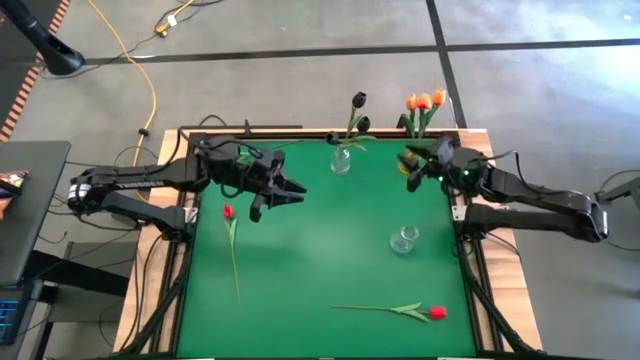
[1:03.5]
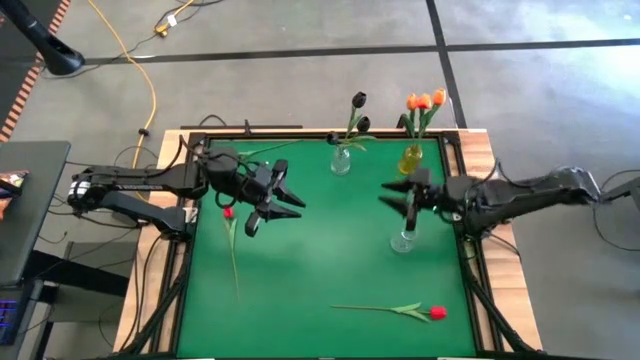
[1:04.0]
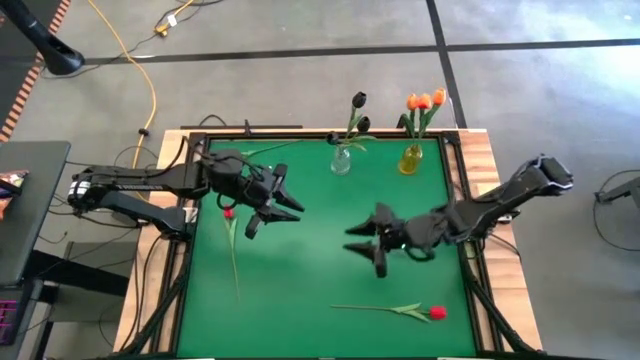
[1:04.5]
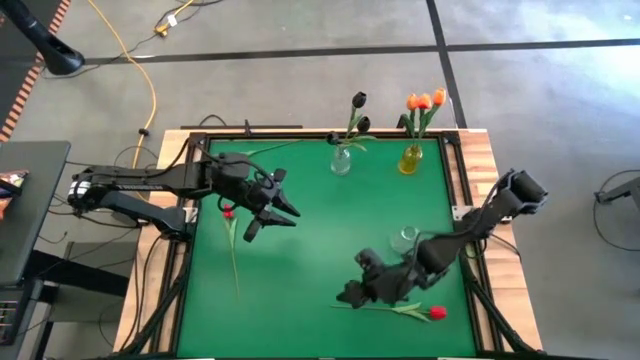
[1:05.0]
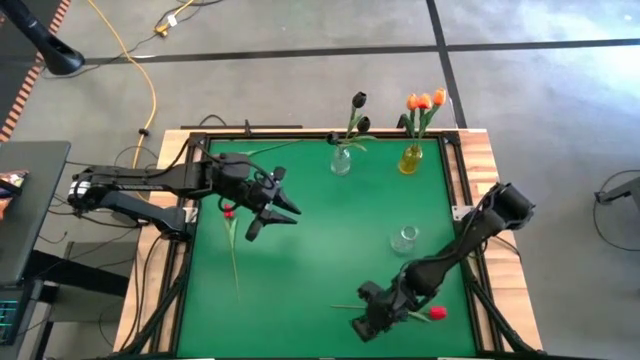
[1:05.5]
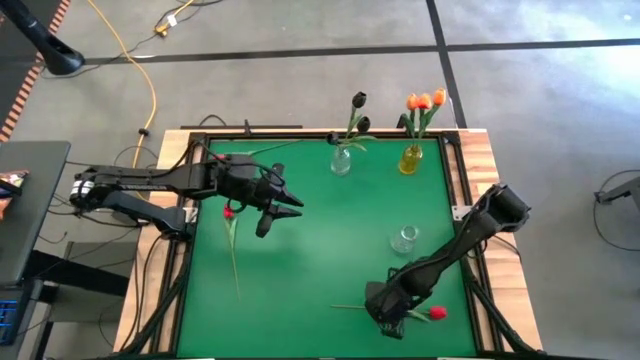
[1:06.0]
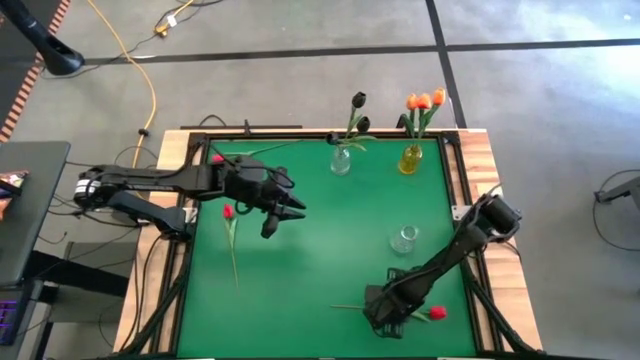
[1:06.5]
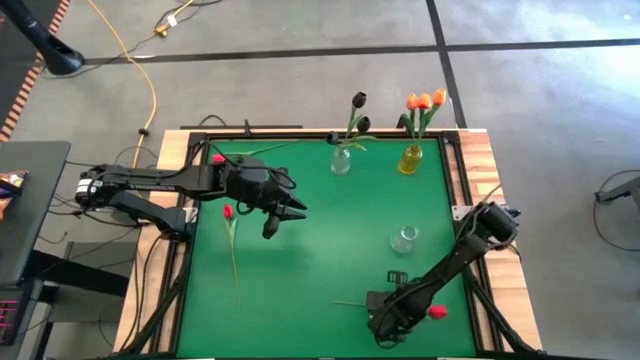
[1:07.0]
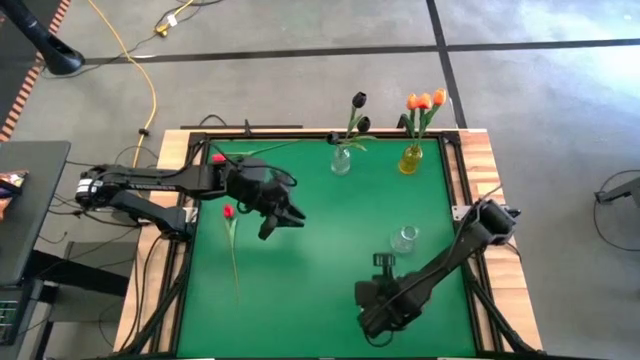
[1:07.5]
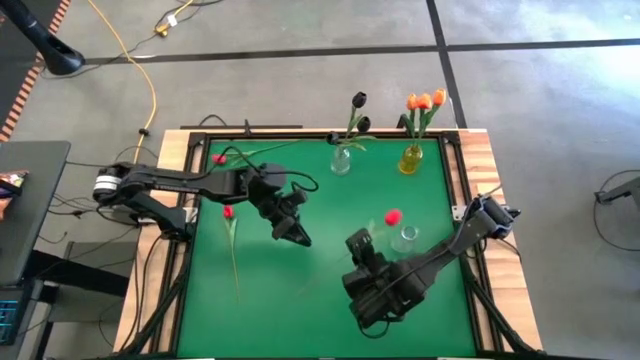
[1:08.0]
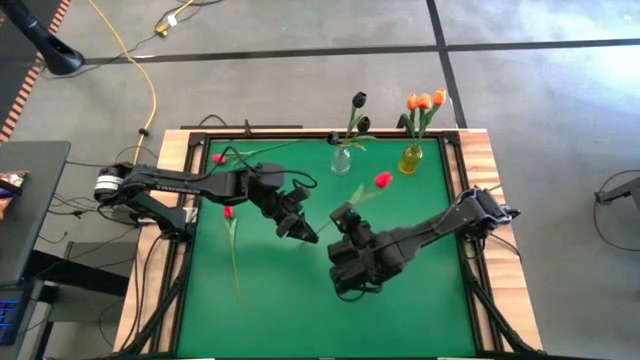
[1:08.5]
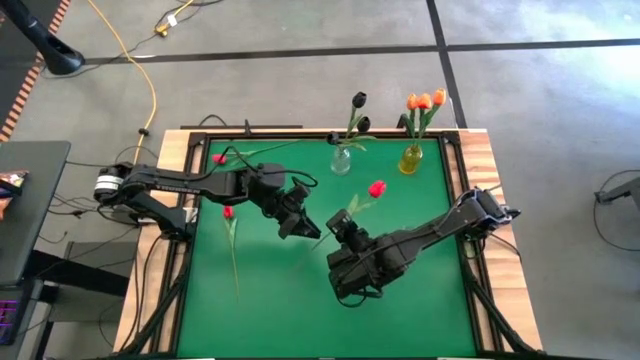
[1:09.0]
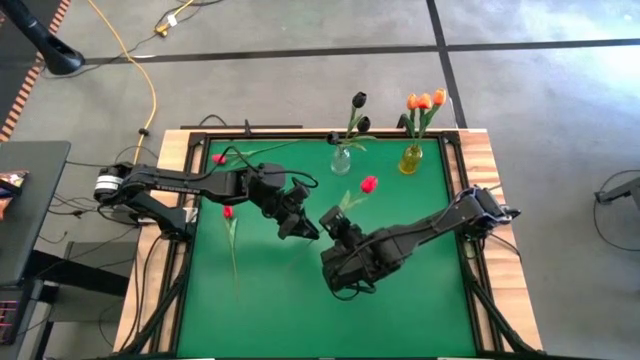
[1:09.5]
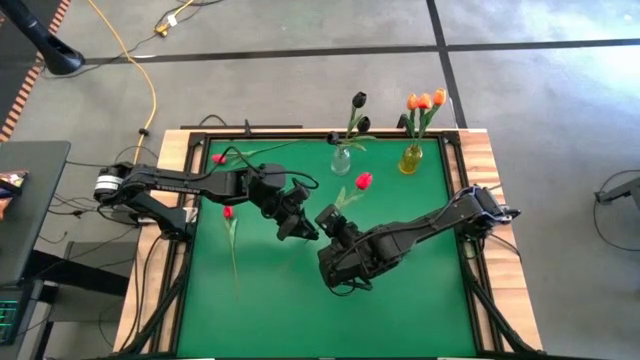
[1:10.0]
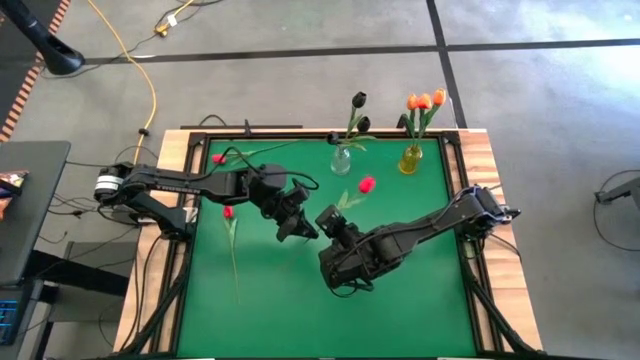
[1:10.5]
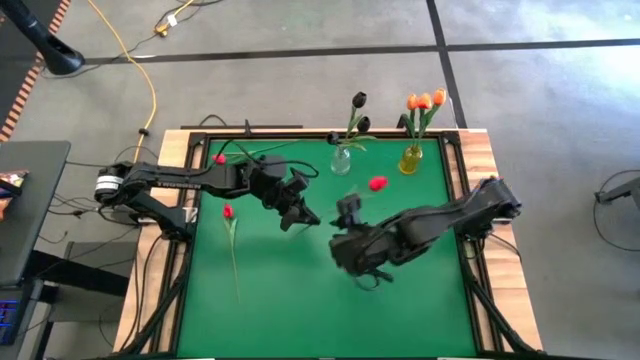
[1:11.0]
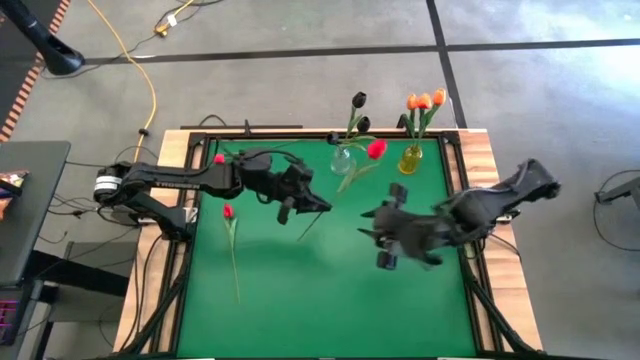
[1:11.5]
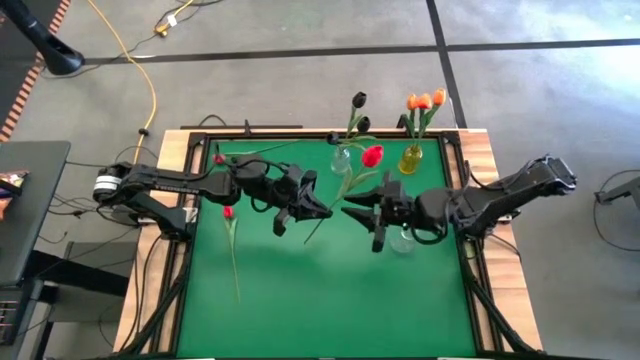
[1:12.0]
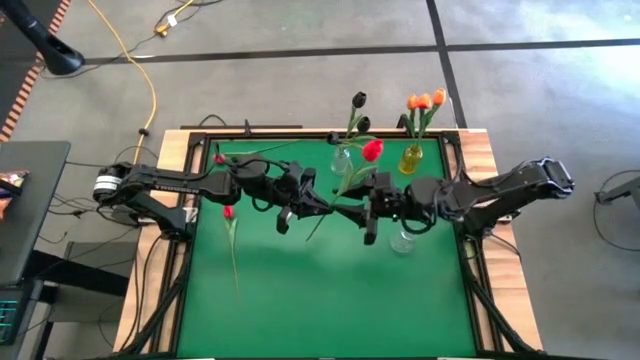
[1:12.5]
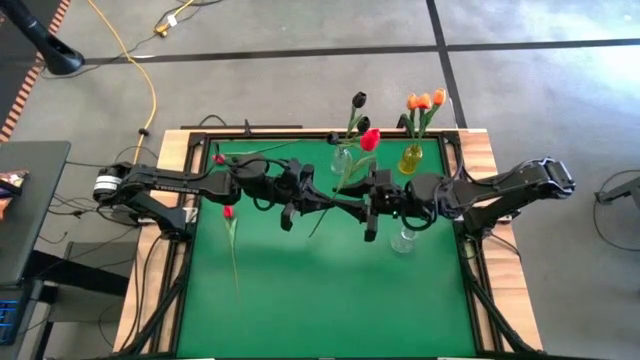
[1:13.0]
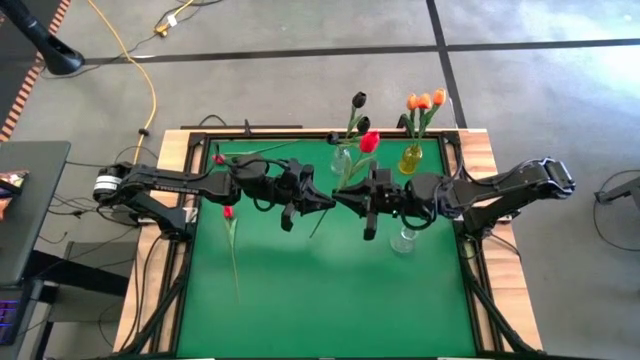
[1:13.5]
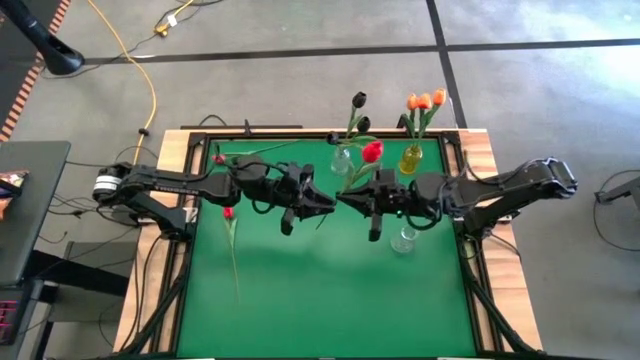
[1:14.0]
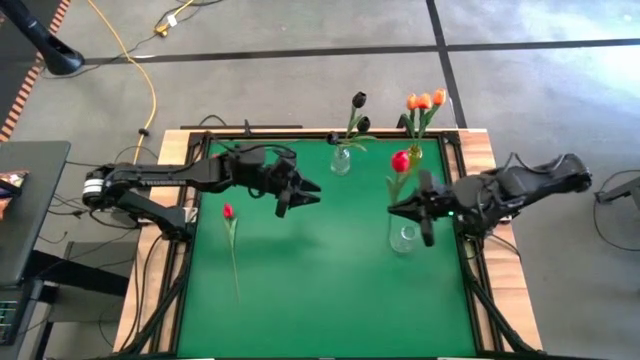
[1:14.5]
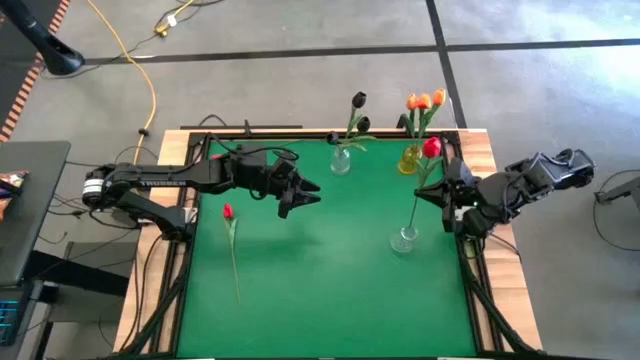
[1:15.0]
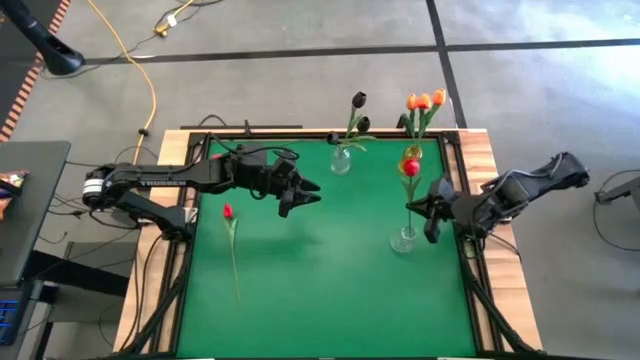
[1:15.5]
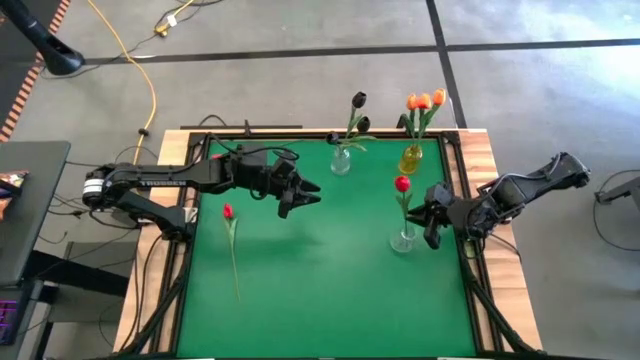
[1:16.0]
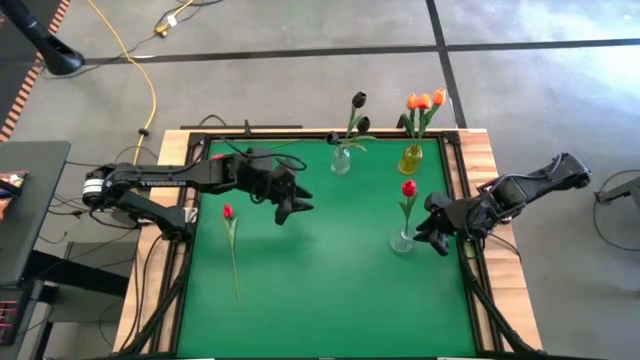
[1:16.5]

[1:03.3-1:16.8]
Task: Sort flowers into vase by color
Put the bottom right red flower into the bottom transparent vase

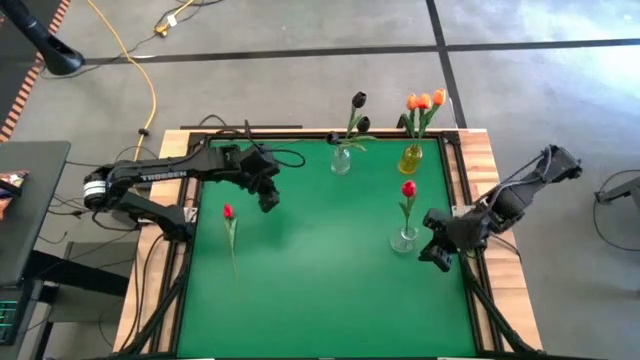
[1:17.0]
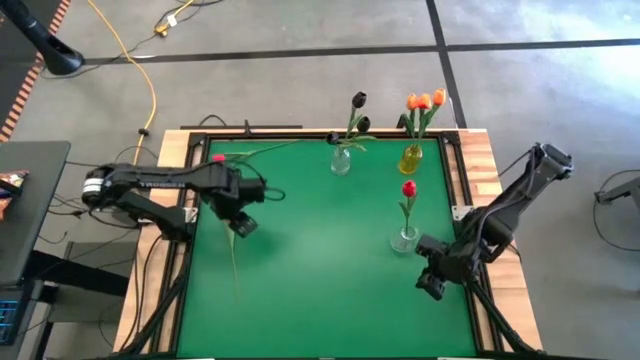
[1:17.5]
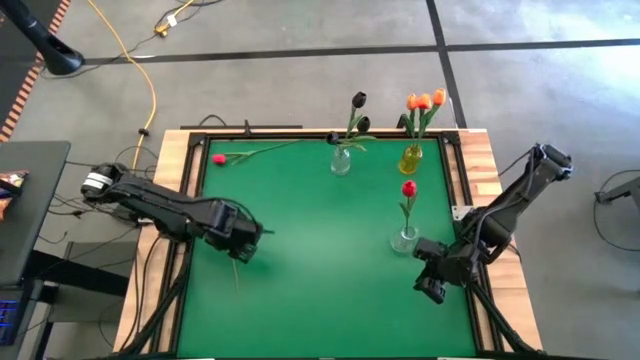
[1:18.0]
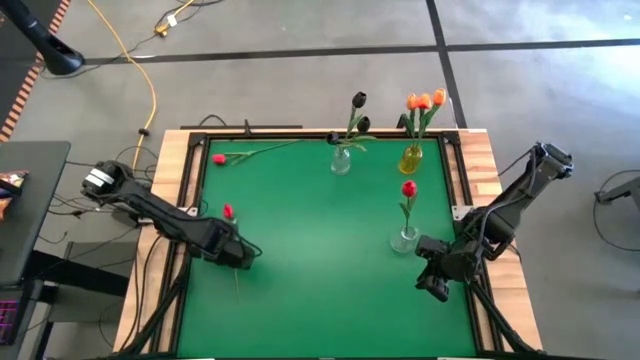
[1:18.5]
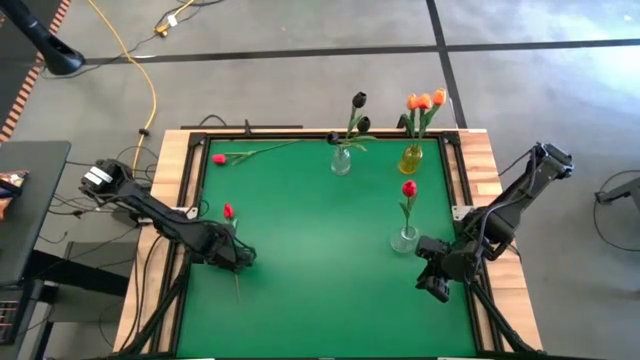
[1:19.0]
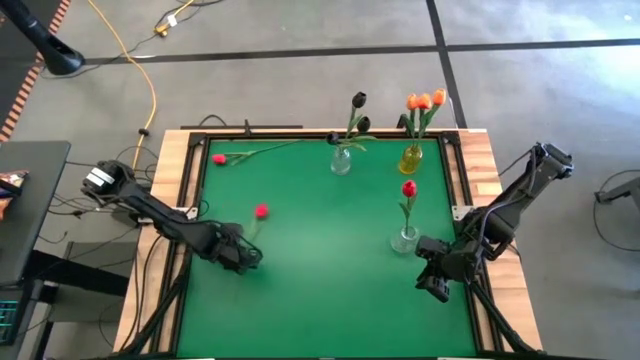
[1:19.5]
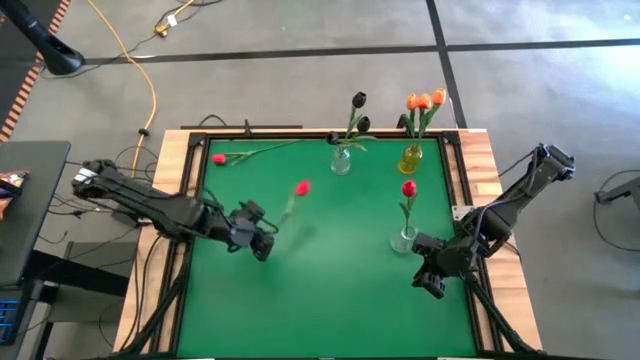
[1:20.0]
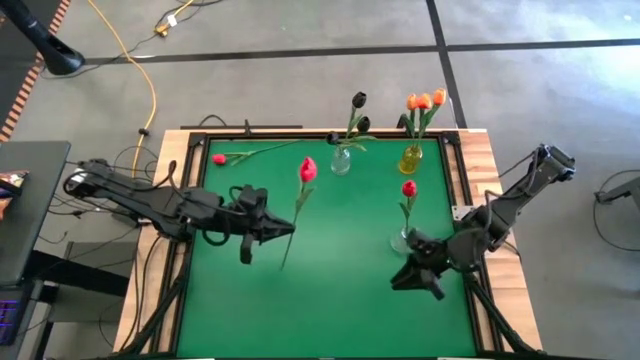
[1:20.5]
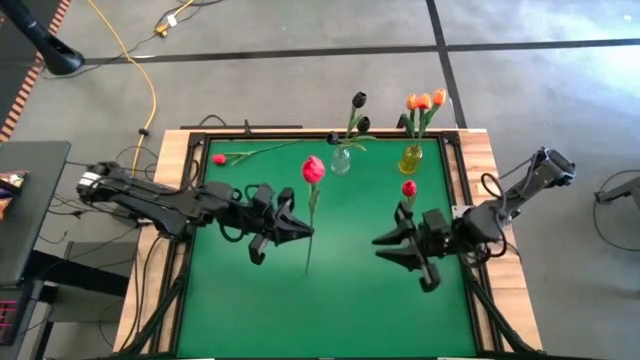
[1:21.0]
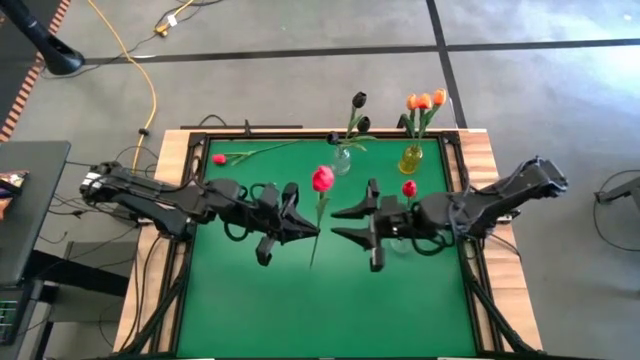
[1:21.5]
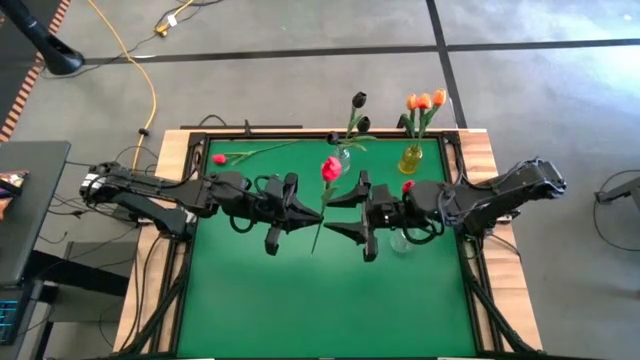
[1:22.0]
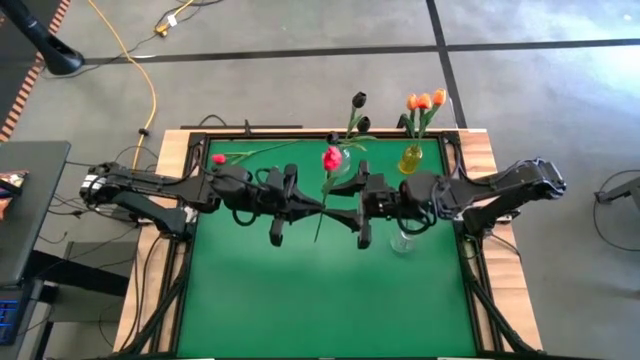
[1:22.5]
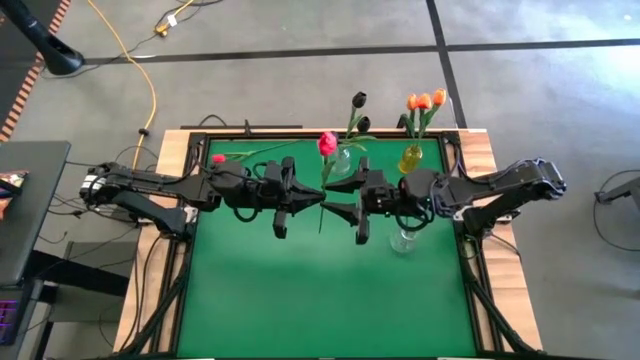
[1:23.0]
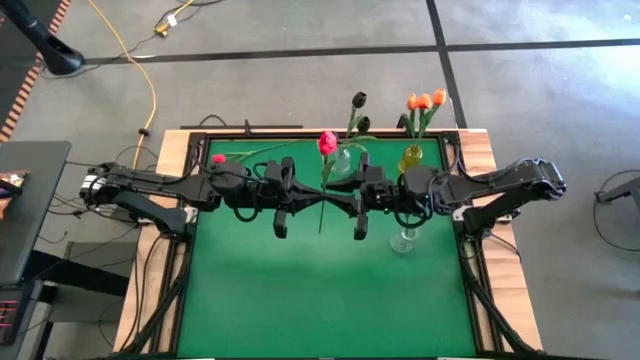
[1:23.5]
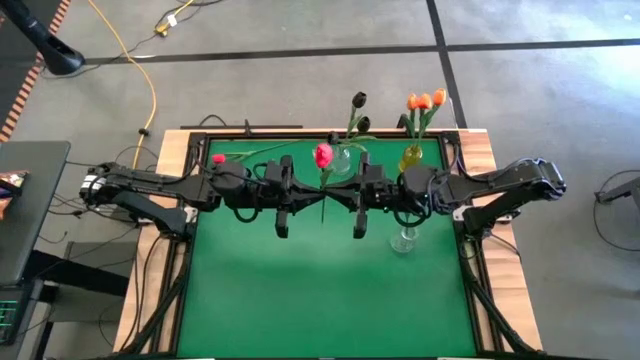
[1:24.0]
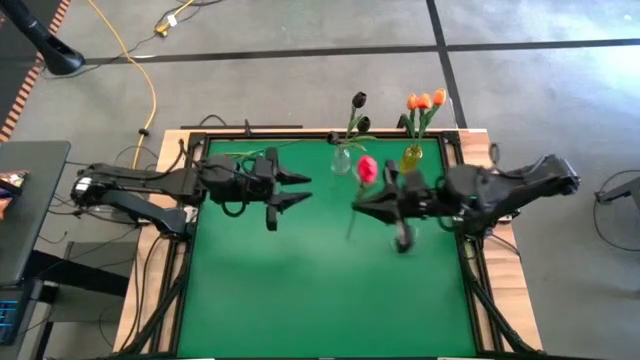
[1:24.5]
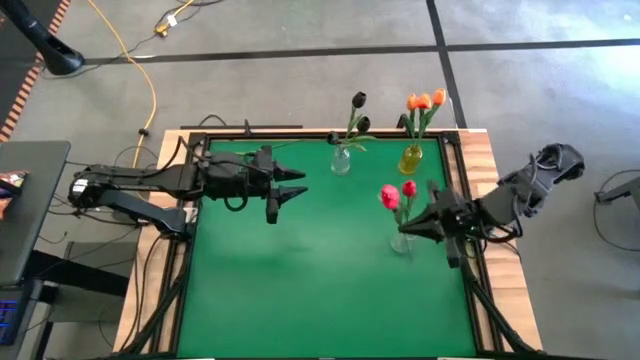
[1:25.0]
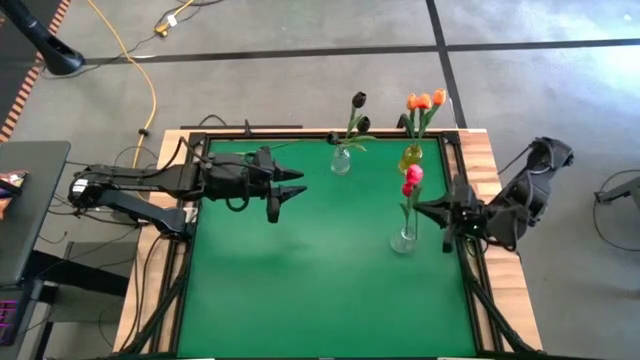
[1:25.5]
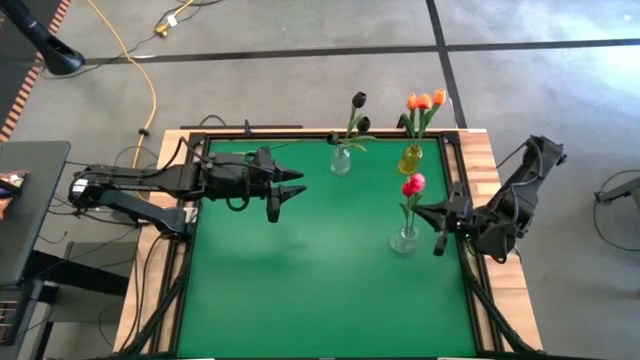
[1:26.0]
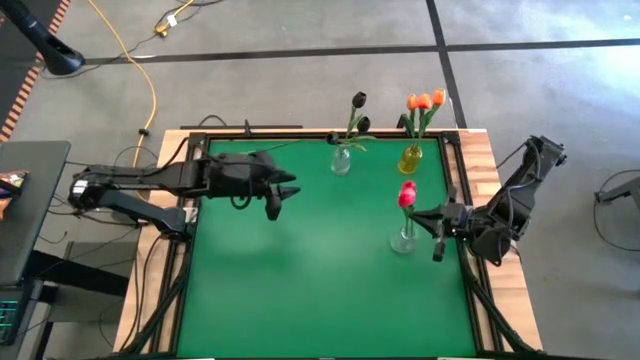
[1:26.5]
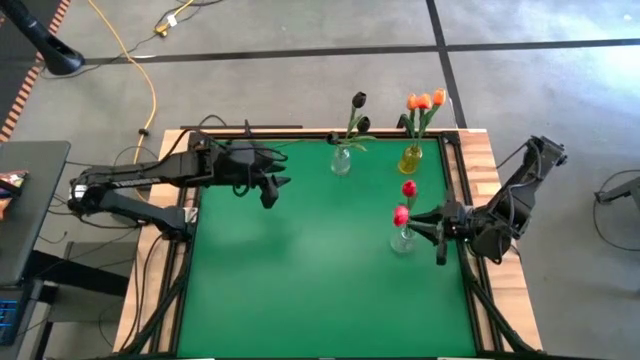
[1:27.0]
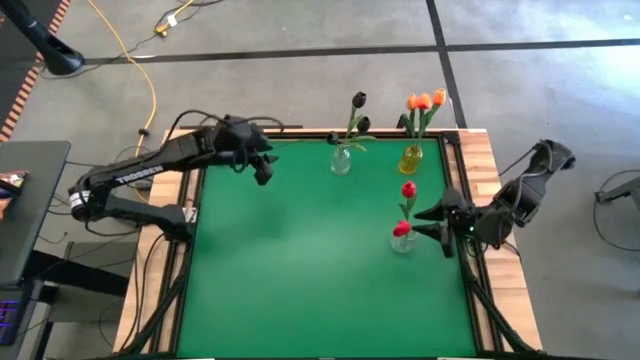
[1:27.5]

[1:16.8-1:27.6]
Put the bottom red flower into the bottom transparent vase
